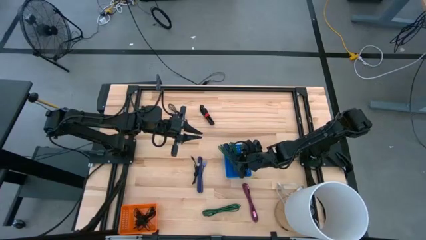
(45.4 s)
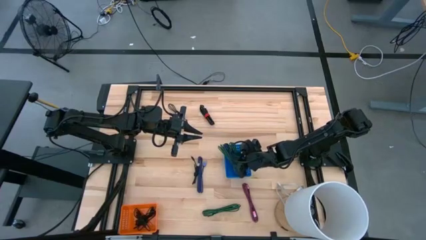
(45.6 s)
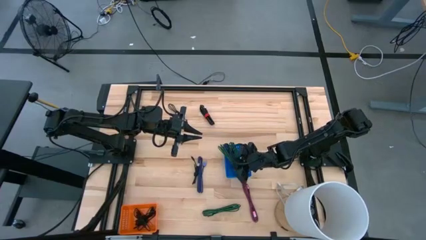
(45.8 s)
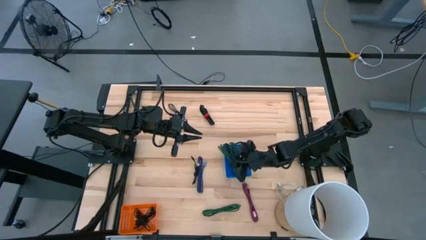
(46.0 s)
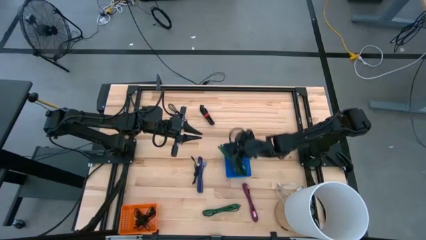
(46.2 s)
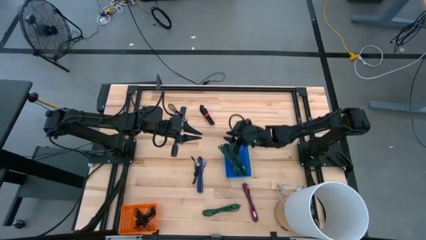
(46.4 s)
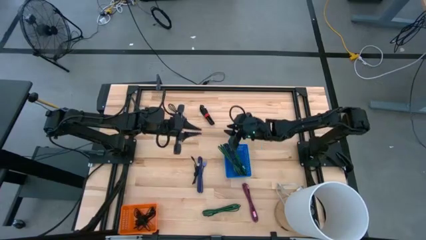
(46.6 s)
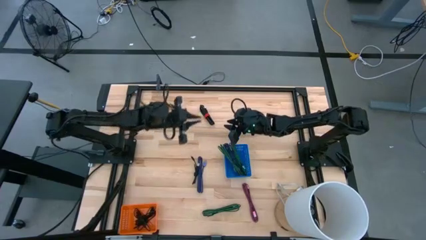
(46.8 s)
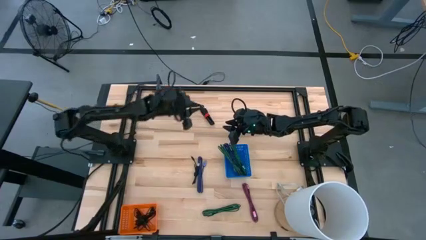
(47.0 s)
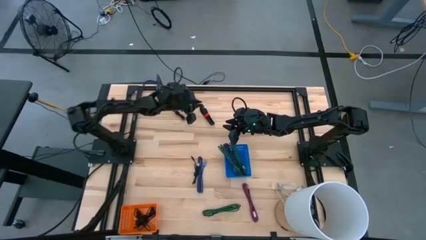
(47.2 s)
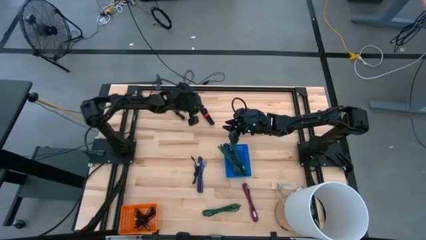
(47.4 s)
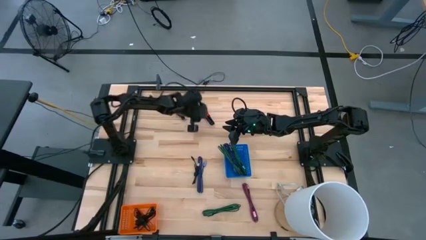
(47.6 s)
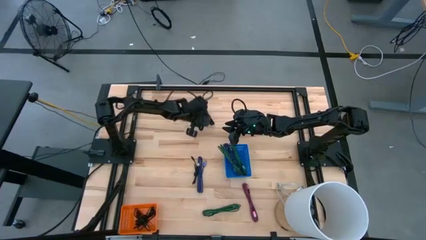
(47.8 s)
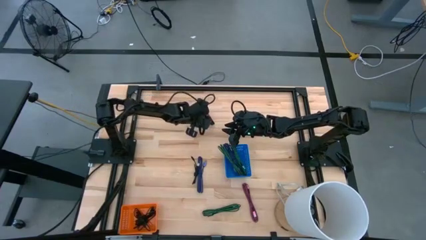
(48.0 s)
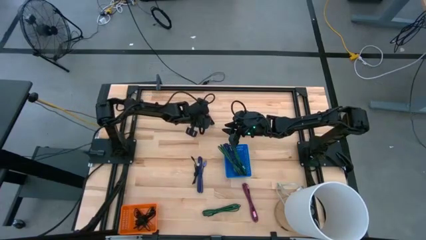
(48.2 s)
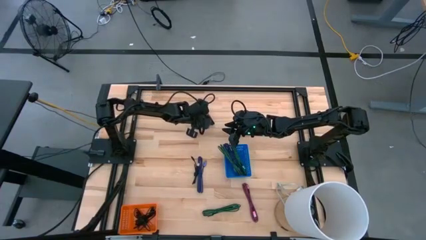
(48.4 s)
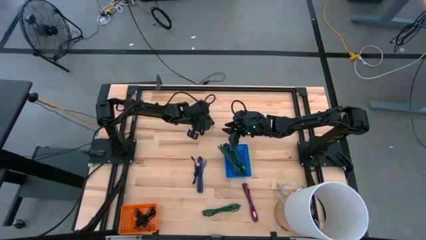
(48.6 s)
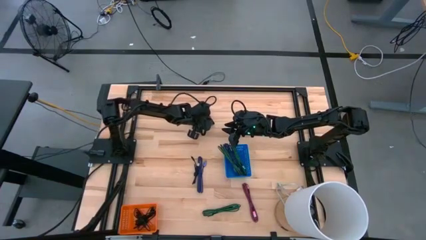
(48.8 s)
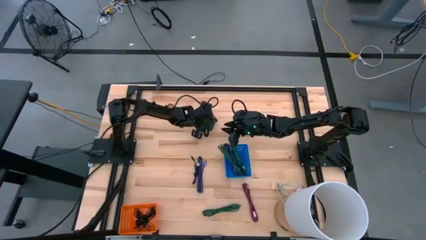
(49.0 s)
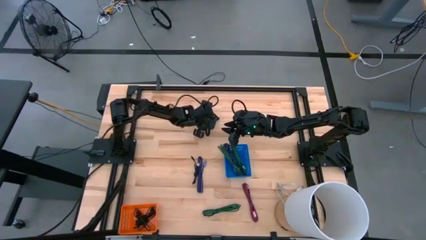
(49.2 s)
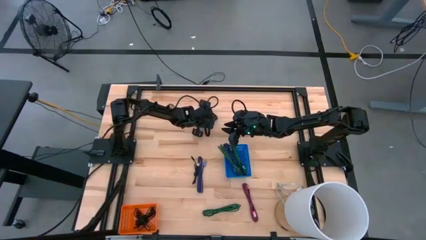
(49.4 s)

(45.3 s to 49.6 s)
Task: Pick & Place USB Port
Put the black charger cable into the orange bin

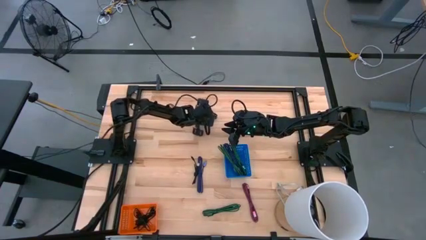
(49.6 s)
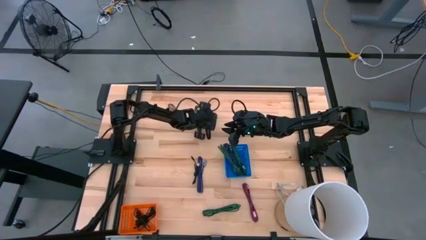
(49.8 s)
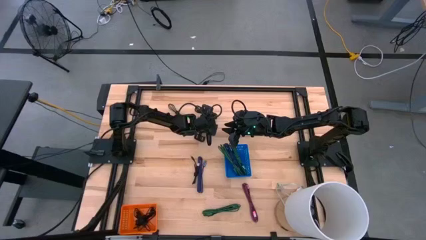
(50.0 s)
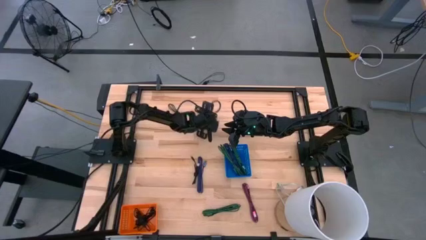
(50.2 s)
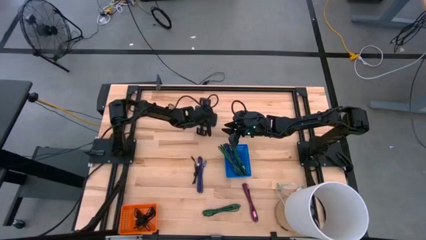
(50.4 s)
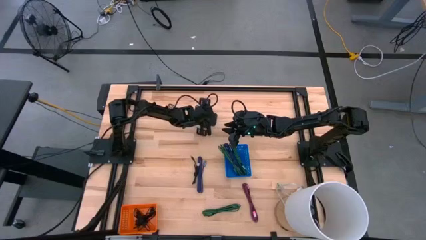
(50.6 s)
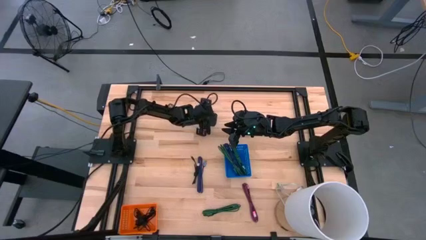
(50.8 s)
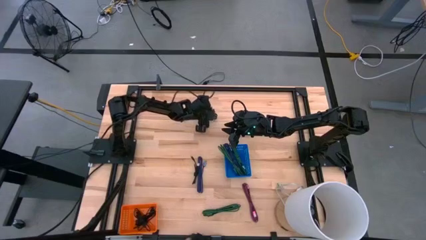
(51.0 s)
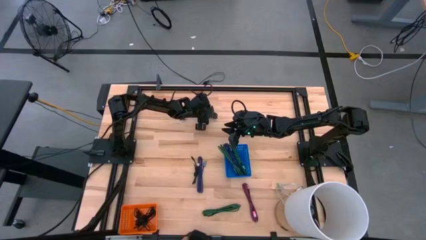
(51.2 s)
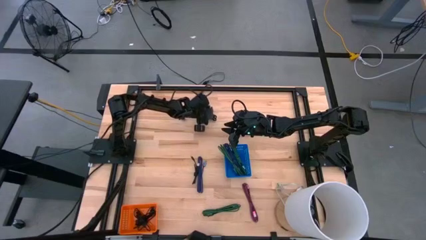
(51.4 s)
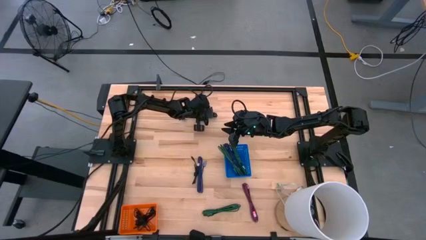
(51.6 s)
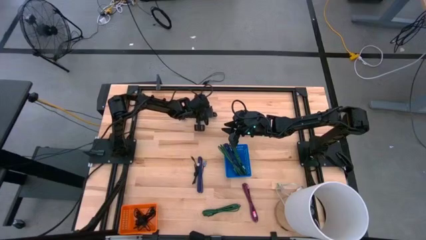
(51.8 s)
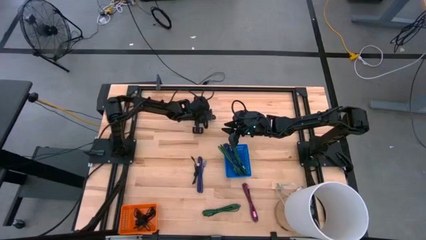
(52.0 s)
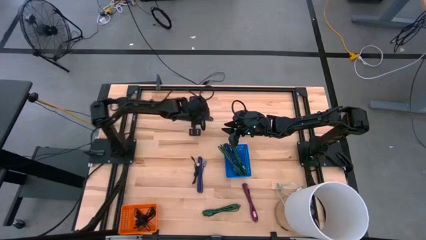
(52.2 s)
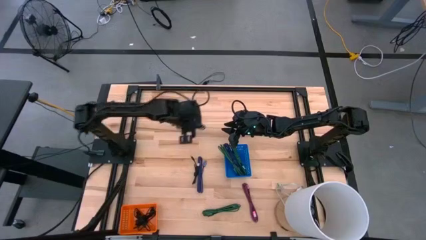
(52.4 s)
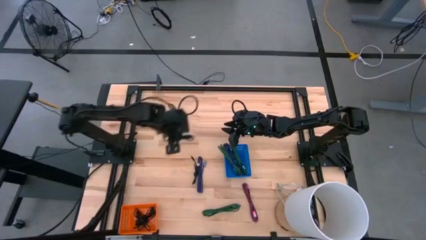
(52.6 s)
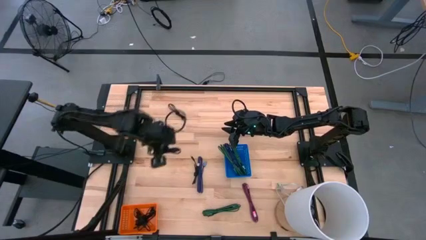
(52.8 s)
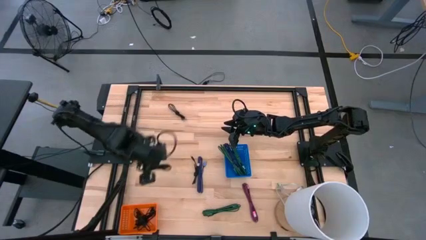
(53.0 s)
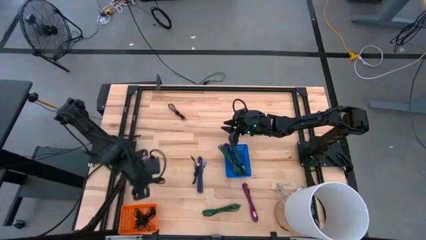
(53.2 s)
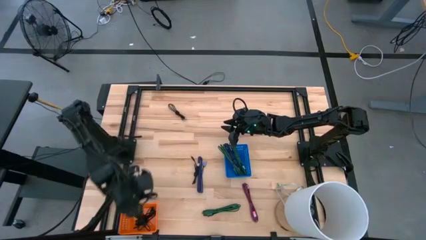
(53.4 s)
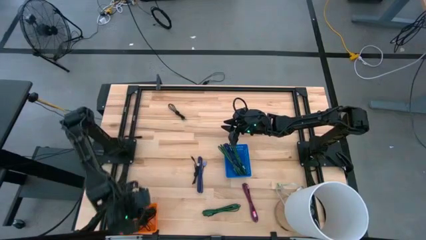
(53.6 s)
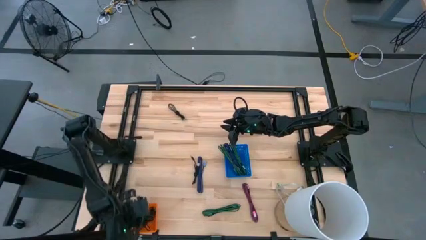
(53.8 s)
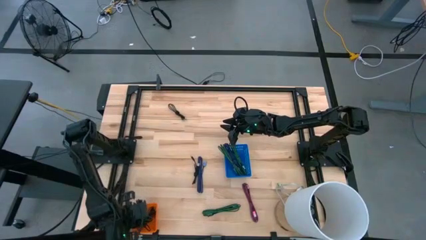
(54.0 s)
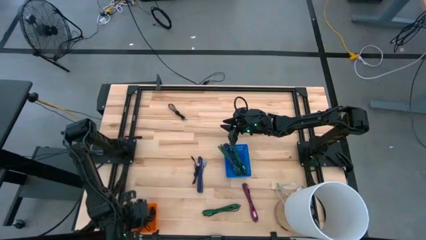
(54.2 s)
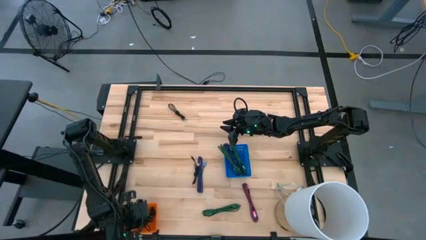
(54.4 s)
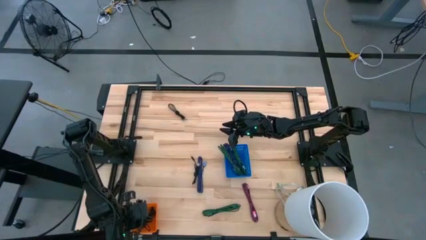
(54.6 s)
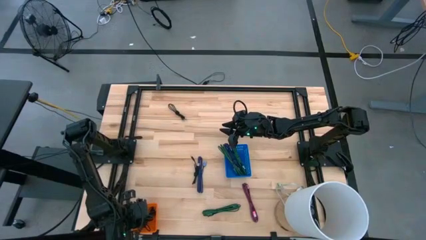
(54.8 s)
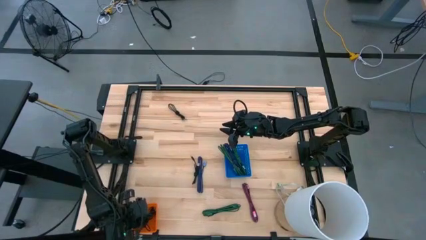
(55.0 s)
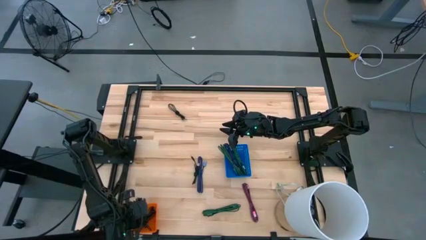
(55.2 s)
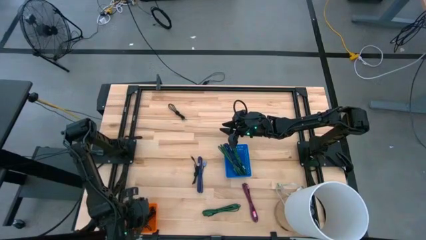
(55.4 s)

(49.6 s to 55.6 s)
Put the black charger cable into the orange bin

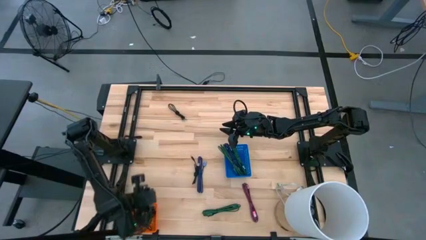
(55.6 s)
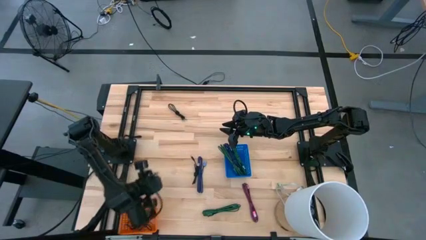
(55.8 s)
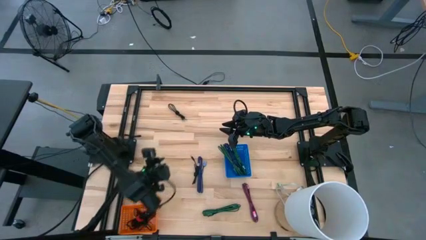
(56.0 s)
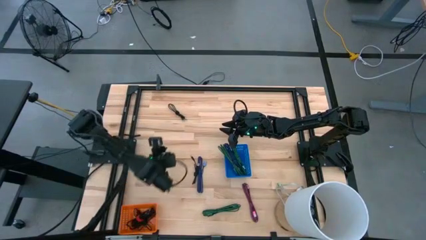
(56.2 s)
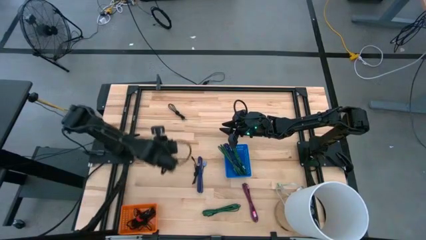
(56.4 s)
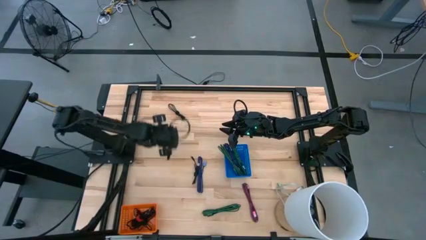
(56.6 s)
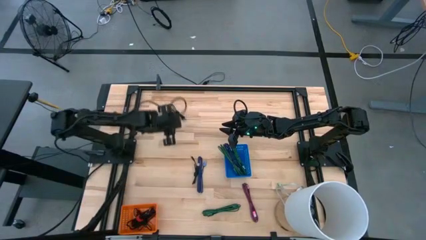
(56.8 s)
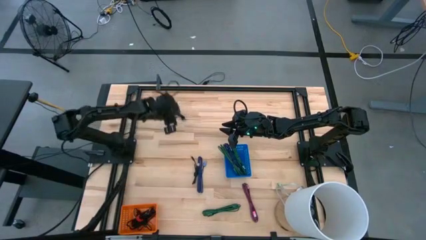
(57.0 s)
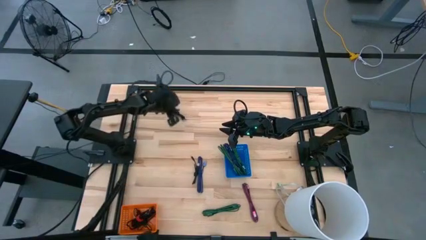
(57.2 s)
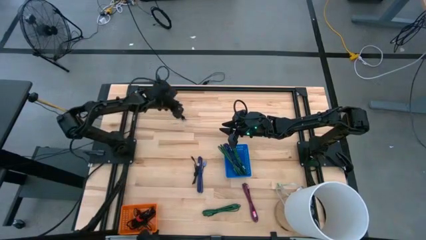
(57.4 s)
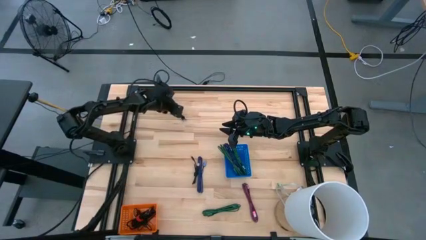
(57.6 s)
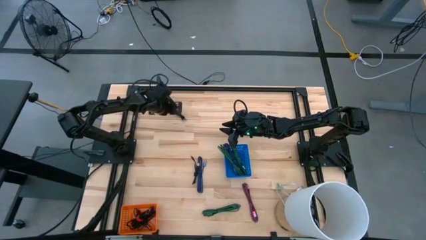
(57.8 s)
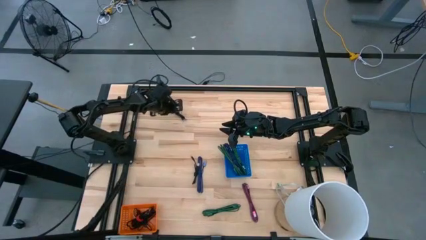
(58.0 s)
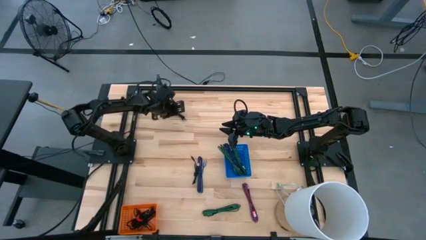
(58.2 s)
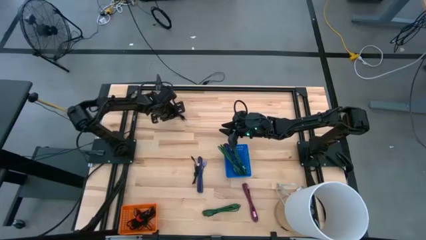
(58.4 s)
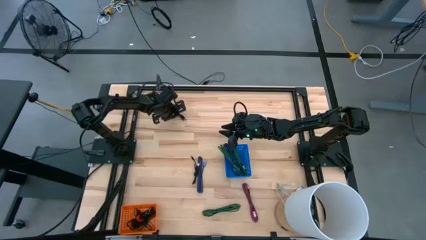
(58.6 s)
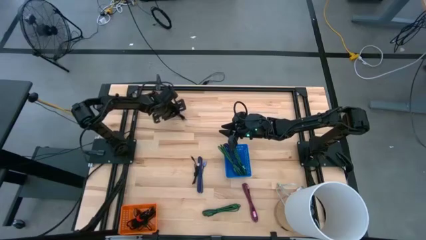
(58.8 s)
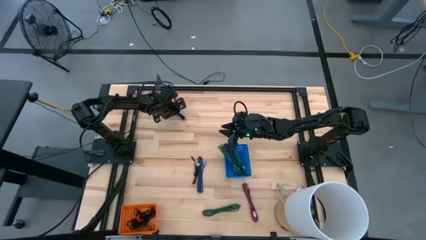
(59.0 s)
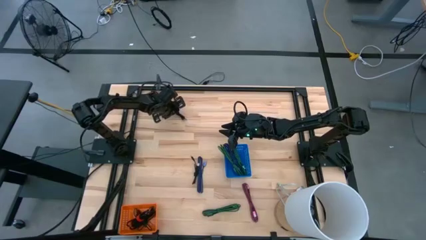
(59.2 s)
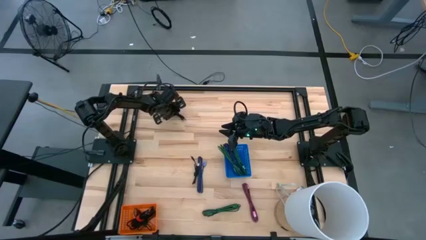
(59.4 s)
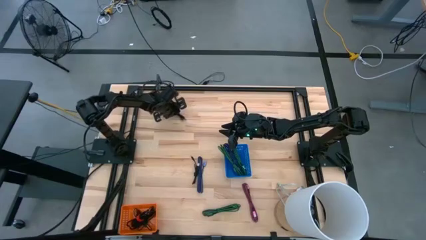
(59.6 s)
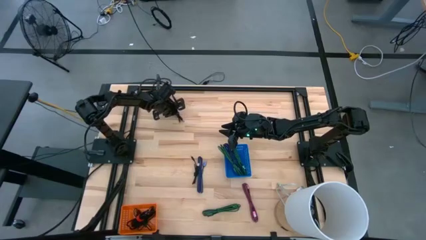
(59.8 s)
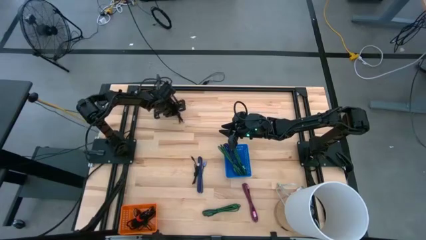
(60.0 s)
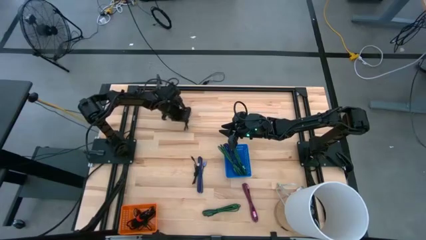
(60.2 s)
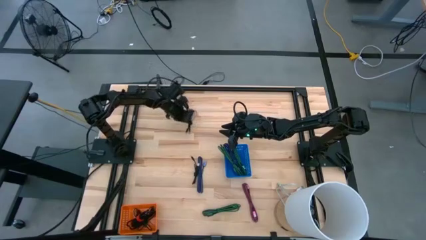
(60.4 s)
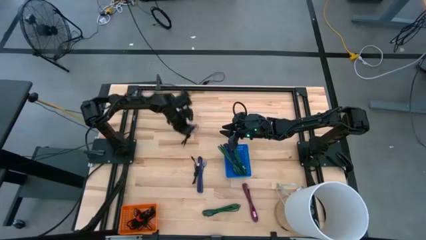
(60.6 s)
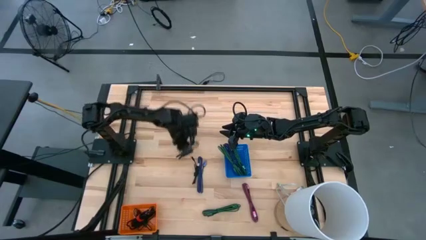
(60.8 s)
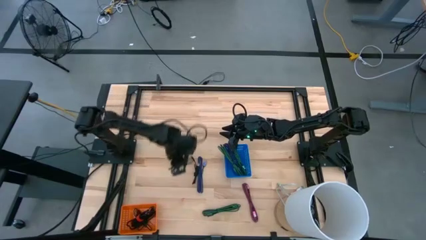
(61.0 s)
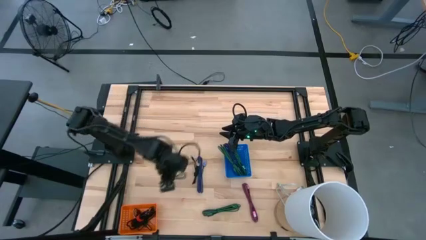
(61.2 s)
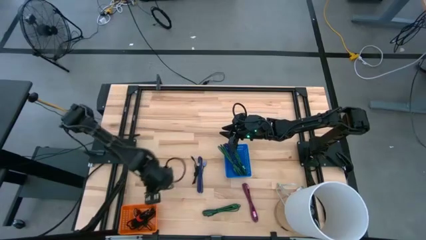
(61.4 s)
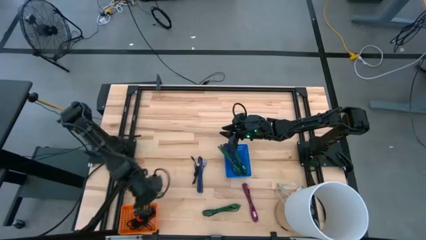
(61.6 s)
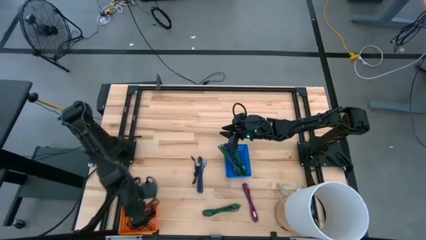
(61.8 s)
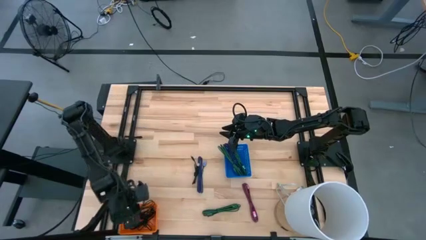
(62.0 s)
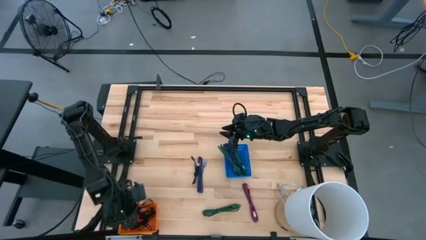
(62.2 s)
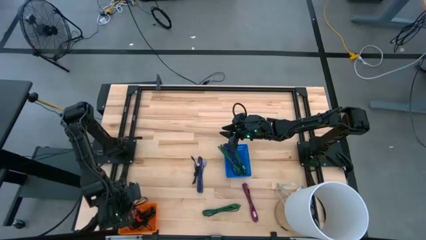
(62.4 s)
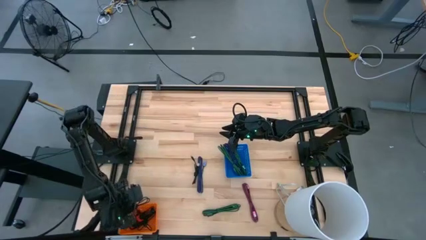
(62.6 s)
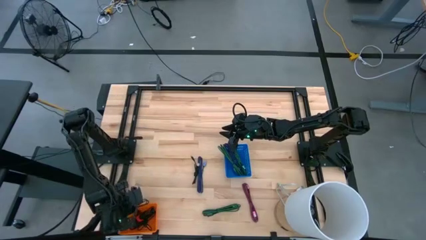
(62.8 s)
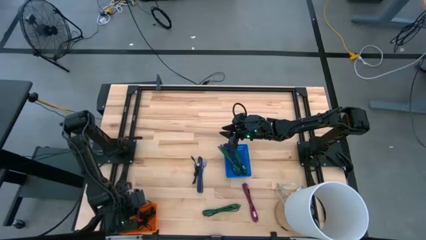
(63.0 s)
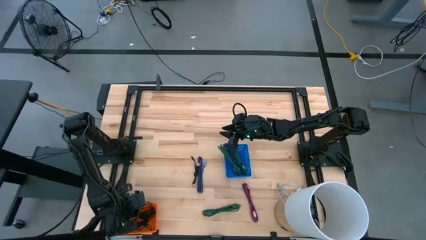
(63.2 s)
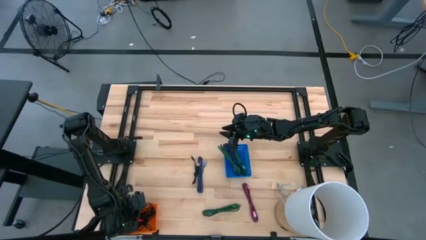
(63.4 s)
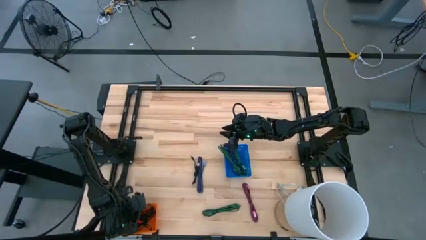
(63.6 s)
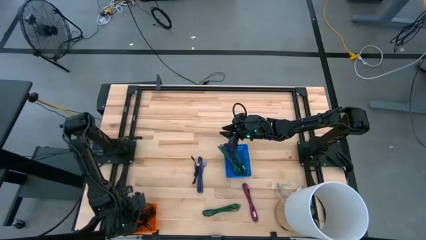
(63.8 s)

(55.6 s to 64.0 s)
Put the black charger cable into the orange bin
